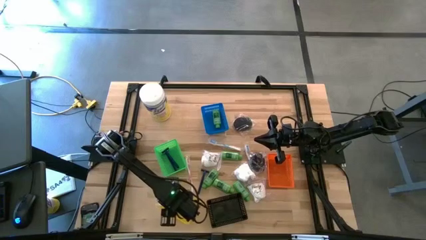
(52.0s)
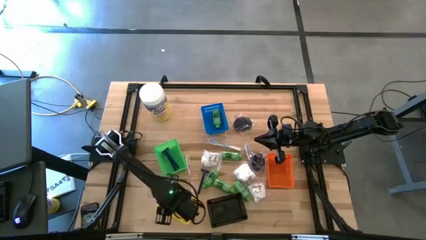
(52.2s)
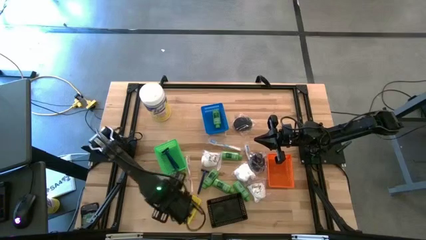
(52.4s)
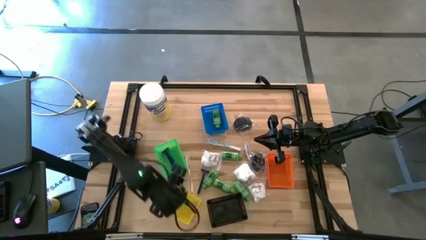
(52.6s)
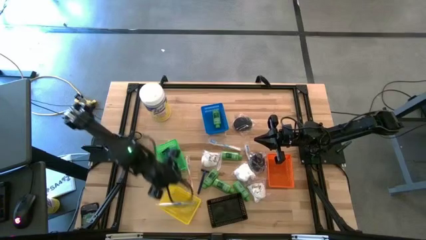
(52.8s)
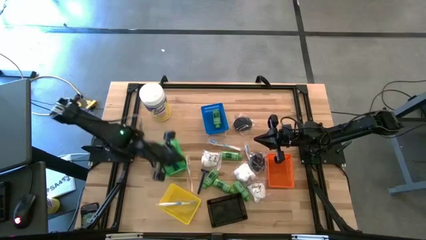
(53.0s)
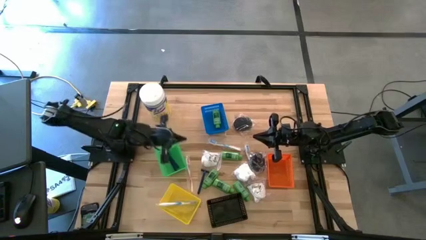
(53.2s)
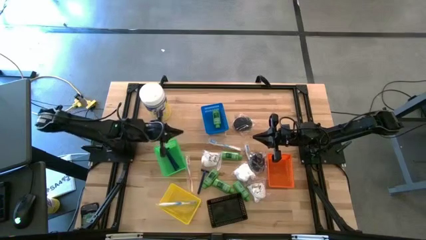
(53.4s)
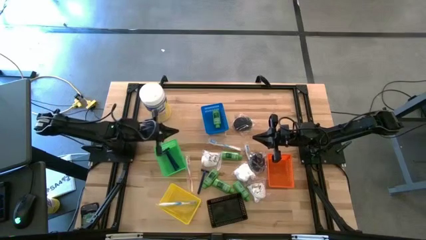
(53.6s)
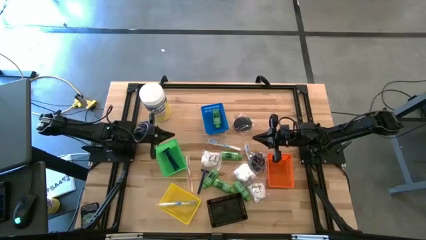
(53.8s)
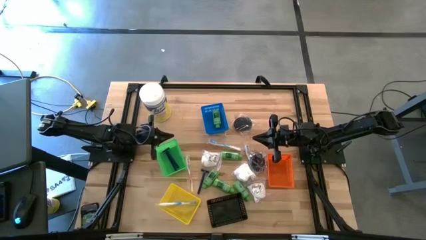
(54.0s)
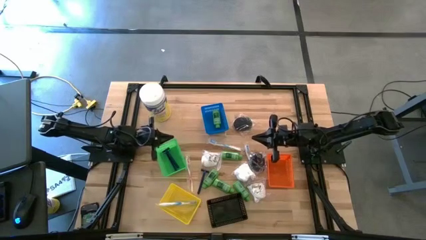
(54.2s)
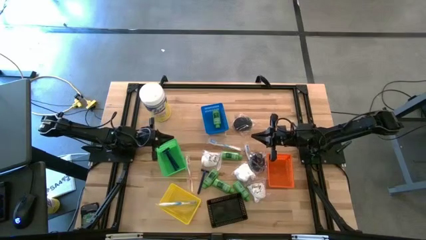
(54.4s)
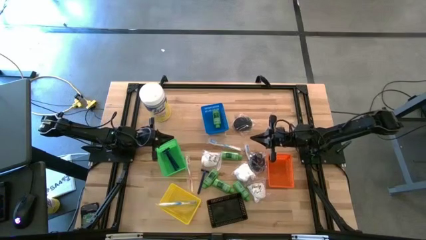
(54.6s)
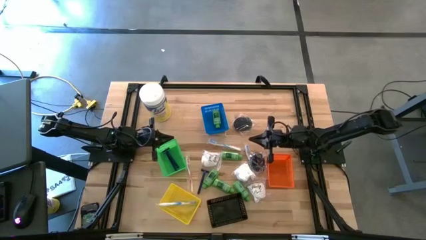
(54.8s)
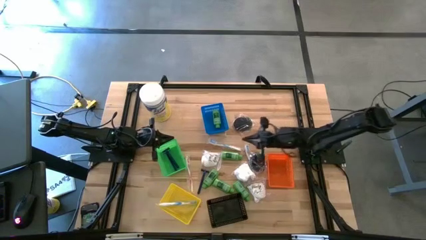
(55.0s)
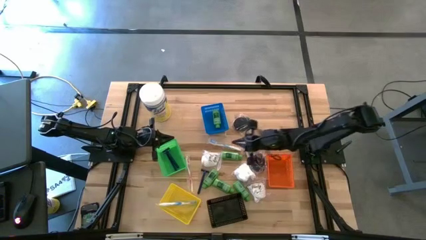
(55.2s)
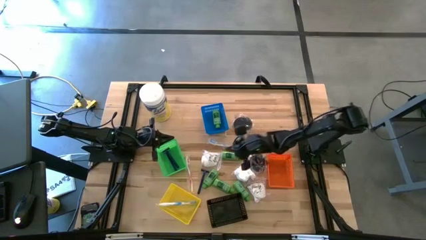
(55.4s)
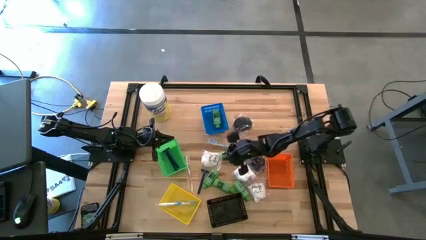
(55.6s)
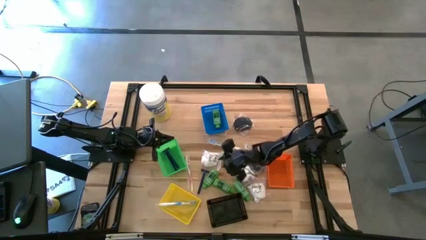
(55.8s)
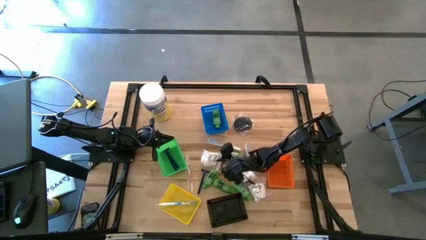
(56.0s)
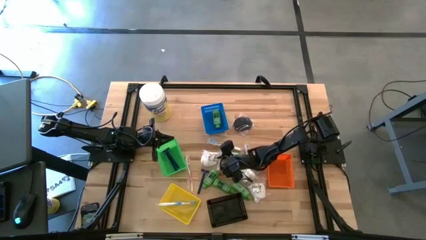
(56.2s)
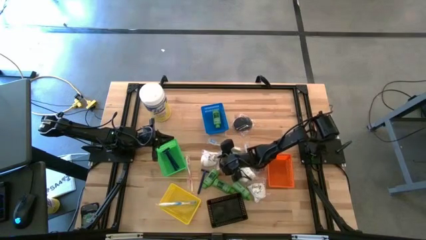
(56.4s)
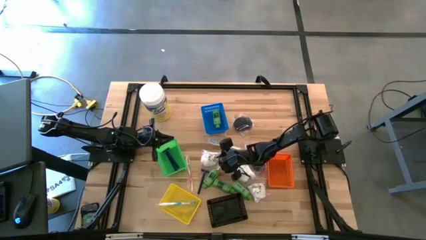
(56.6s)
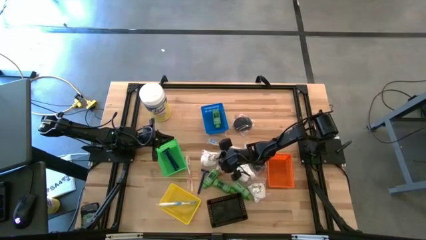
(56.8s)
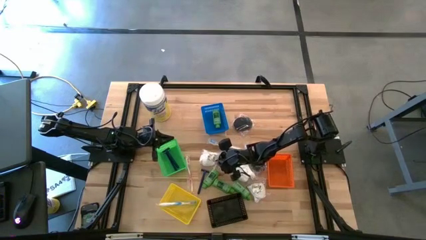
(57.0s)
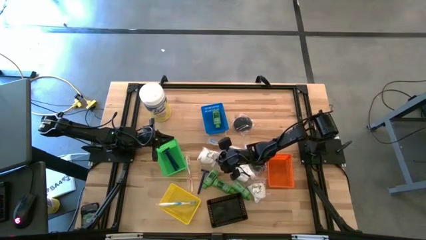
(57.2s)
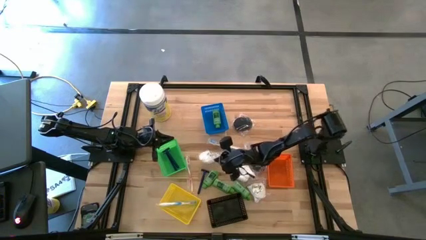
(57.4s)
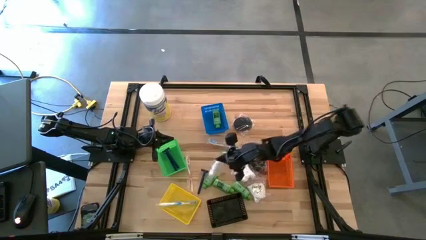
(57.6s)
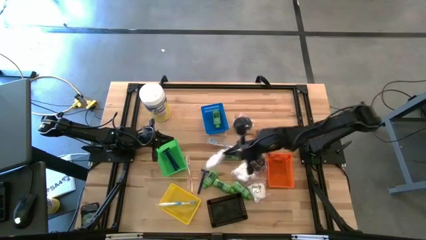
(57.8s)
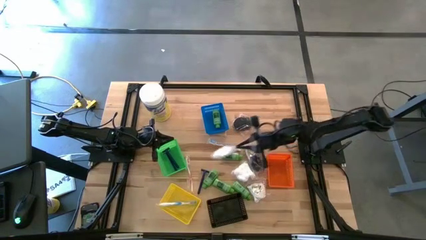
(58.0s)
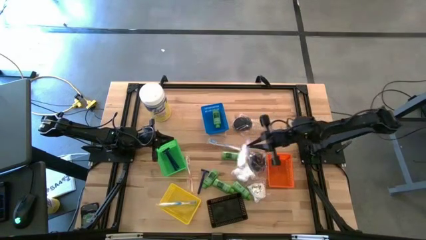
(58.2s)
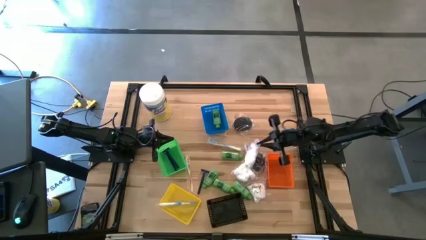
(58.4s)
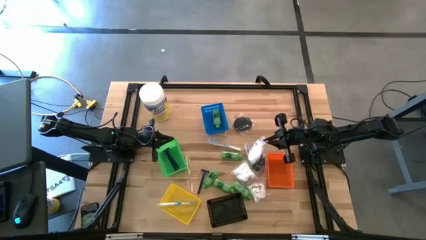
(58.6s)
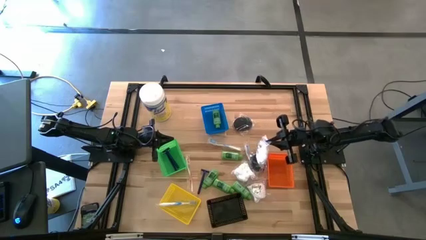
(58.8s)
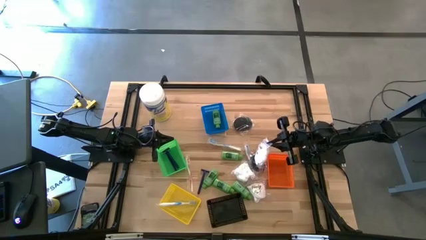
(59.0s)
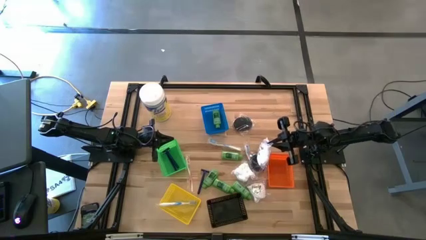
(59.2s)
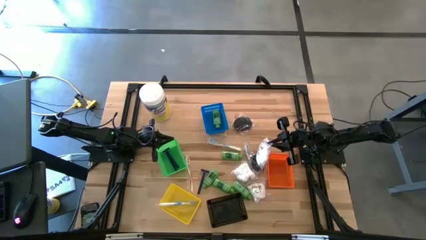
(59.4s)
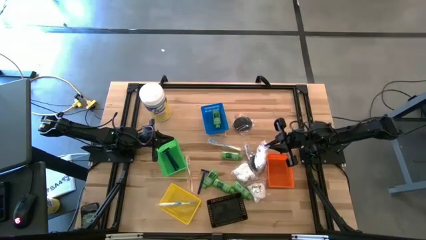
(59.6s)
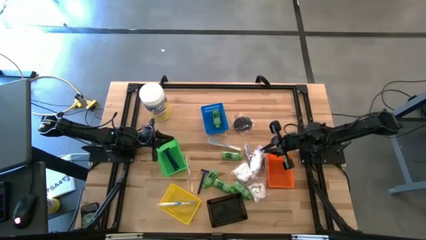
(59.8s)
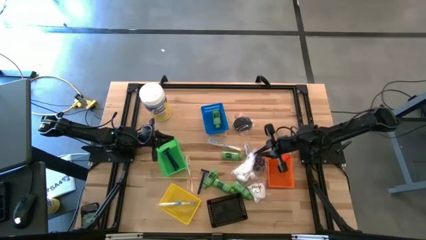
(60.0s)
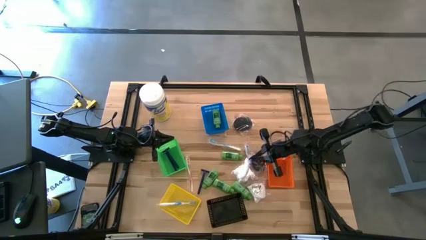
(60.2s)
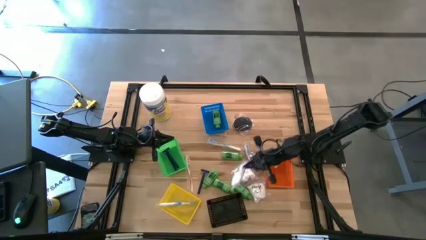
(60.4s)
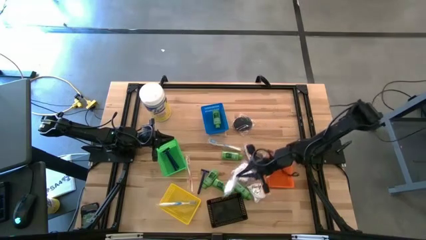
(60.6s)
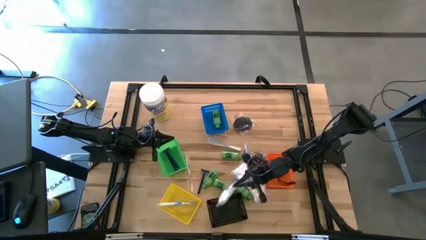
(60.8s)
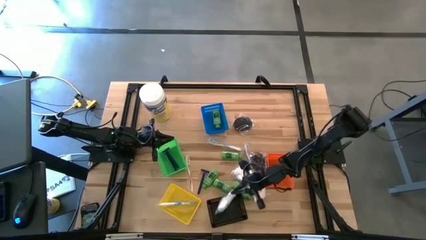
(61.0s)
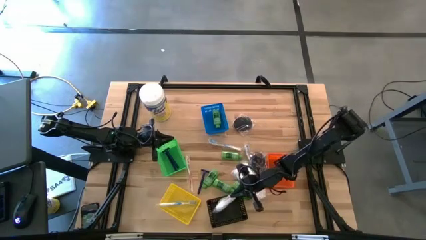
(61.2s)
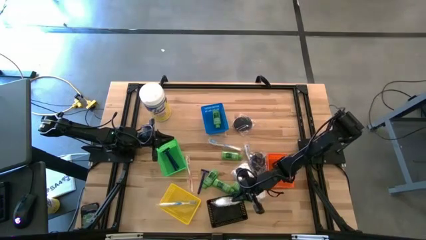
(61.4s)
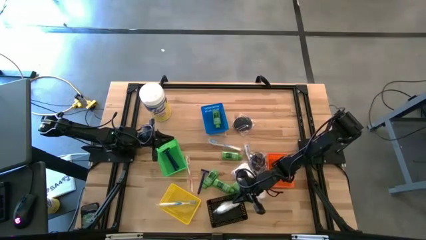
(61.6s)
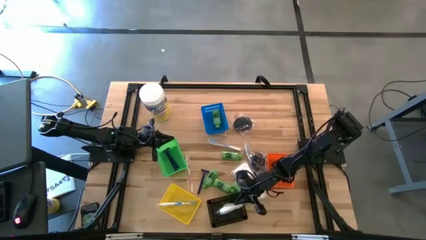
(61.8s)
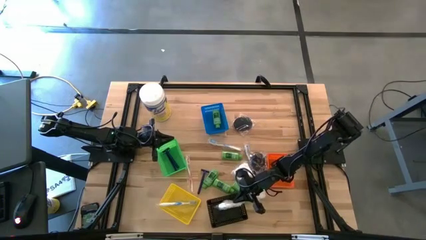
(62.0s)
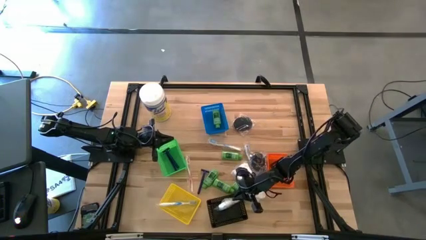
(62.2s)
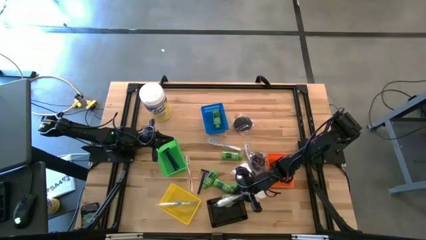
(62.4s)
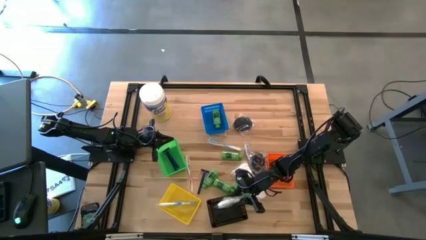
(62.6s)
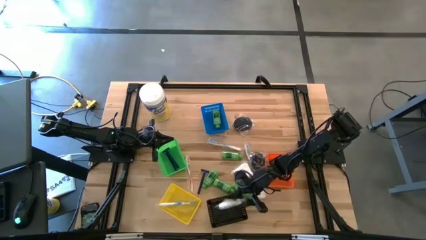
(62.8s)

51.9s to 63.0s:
Task: Pick & Place Travel size toiletries
Put the cotton pack into the black bin

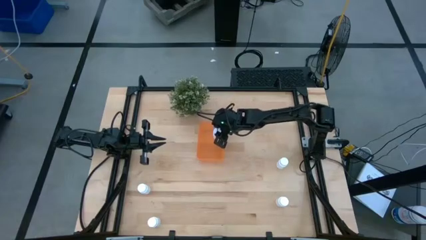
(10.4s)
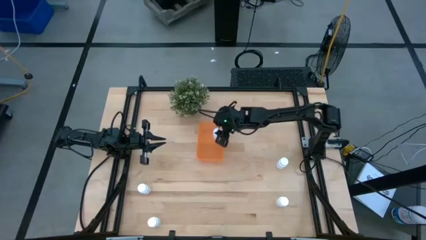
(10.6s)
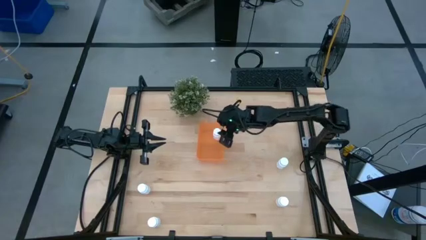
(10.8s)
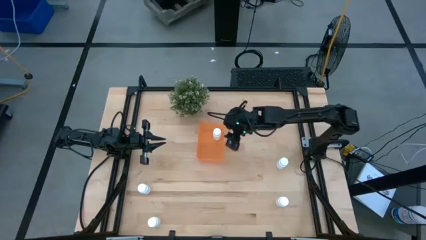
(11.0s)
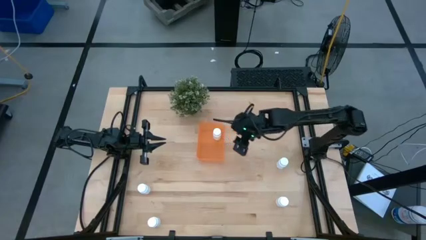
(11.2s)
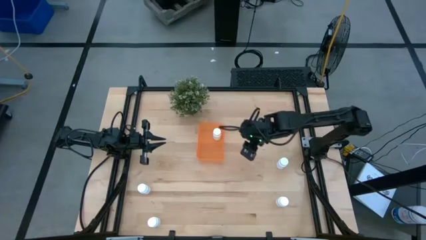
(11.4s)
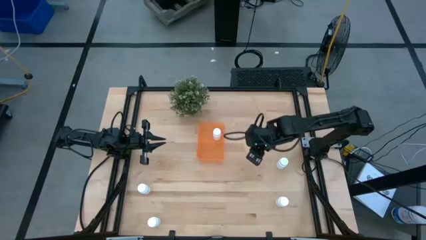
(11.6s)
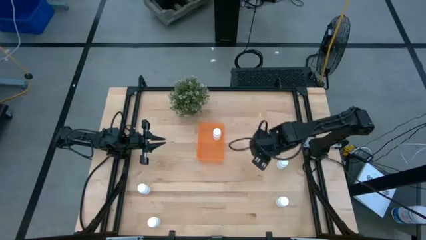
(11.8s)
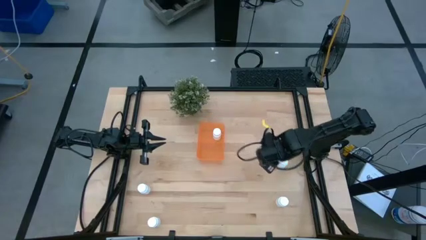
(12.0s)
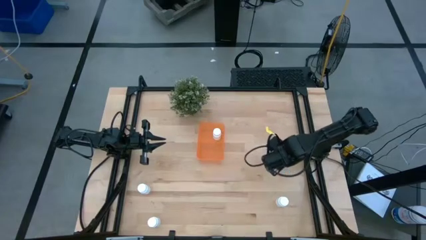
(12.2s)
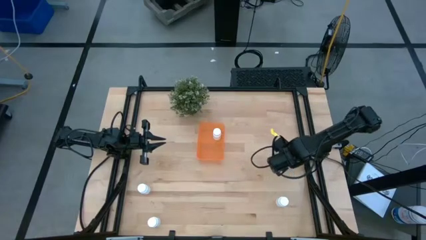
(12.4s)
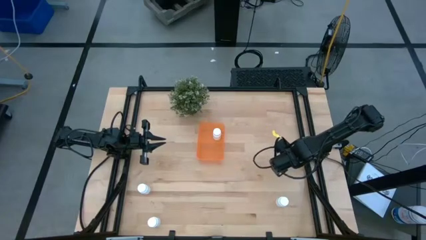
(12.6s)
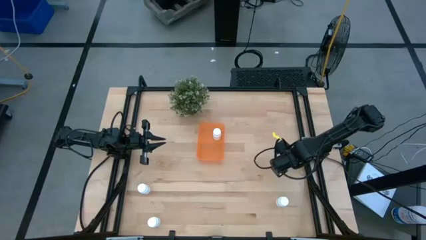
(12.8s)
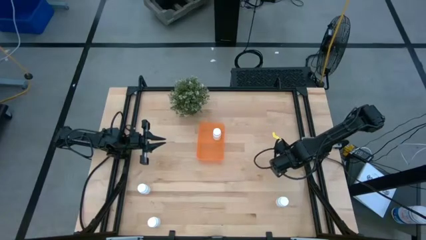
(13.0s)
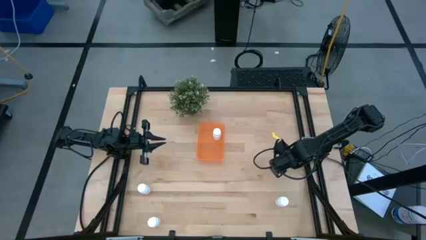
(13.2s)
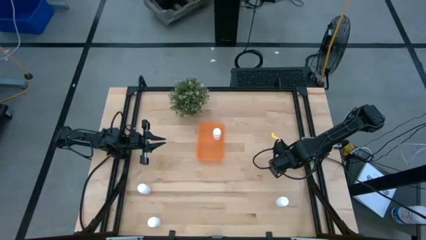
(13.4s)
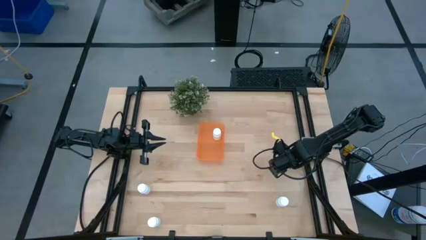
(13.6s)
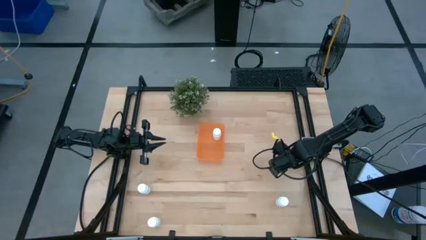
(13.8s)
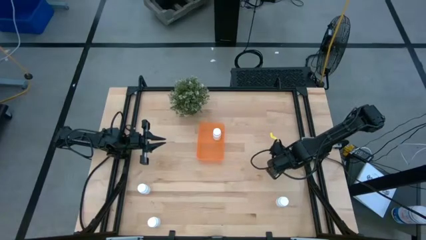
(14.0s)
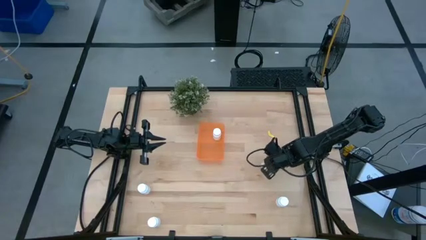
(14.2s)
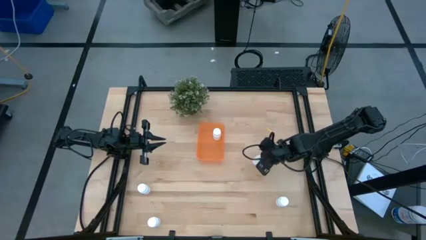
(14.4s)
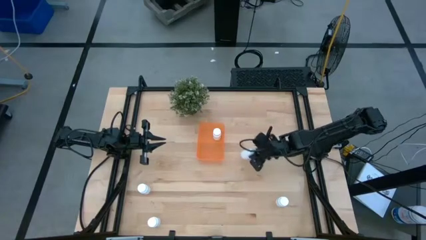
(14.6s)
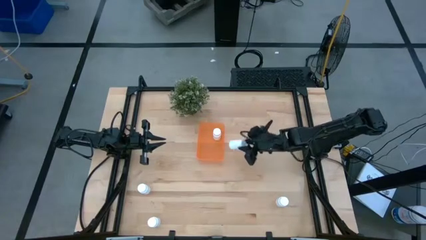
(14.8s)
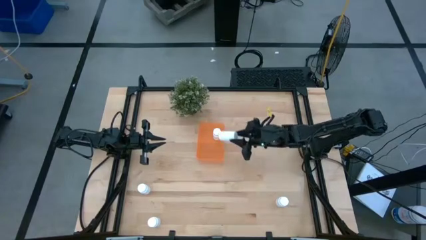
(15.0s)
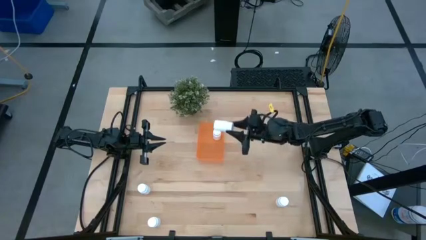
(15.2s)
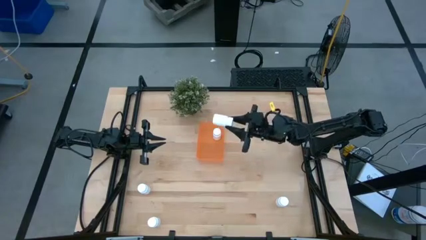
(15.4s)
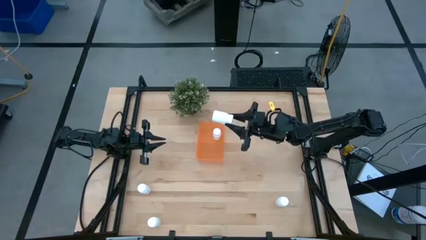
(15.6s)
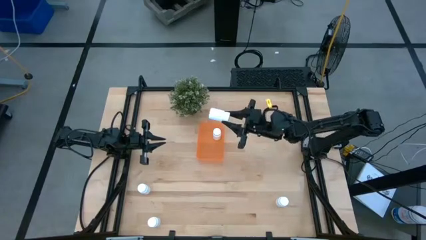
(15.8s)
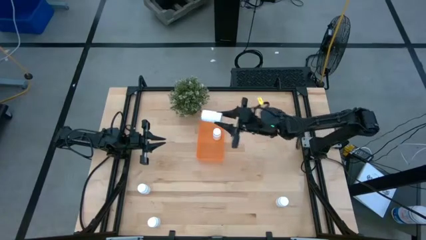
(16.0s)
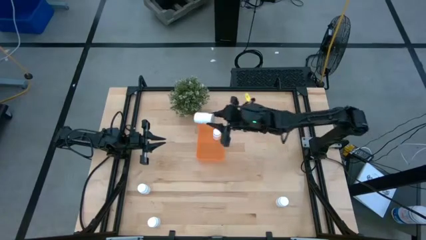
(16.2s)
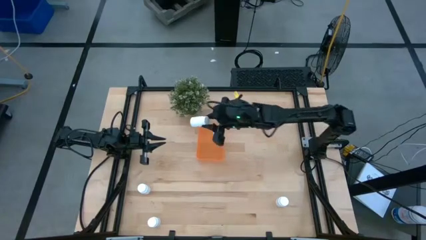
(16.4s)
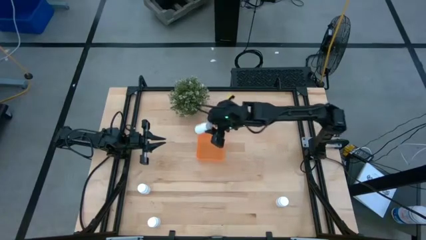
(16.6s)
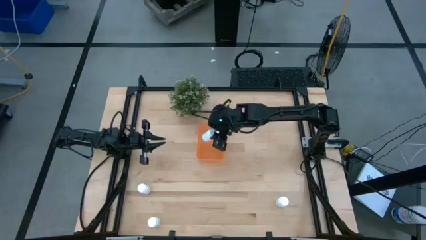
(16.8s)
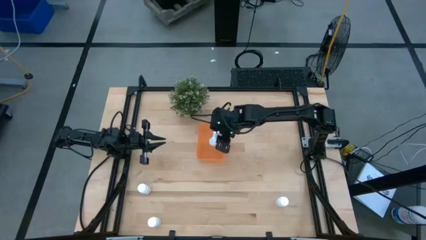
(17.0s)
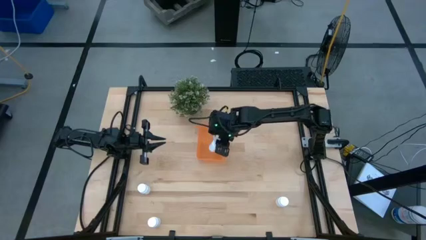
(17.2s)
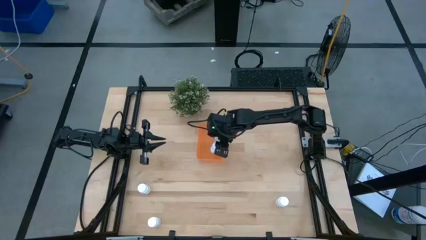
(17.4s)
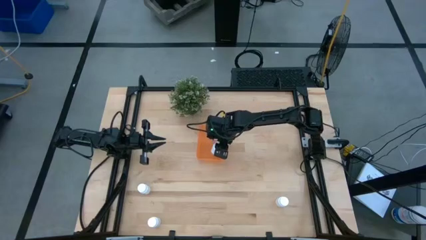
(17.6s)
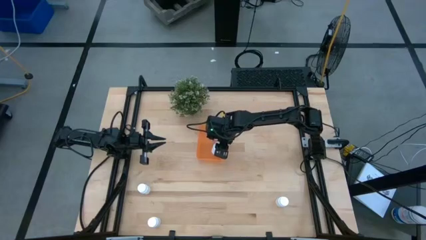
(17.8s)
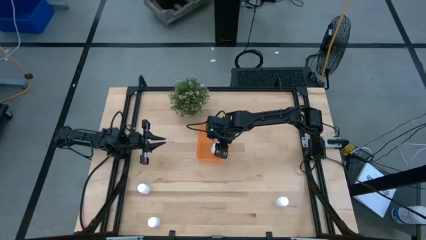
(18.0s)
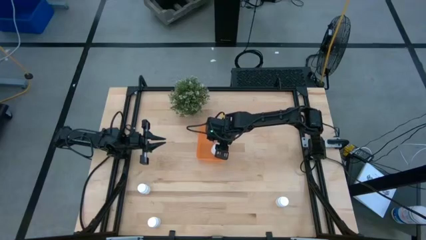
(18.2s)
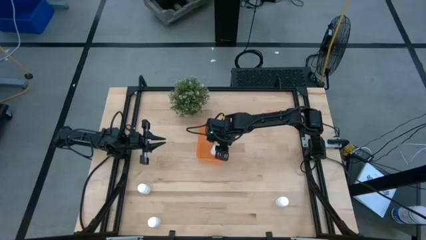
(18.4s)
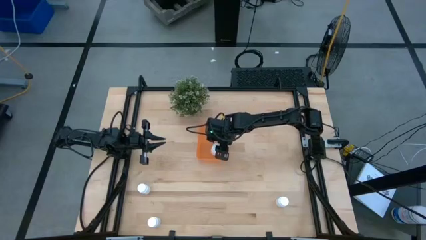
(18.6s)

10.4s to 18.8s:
Task: Pick and place pill bottles into a basket
Put the white medicine bottle into the orange bin
